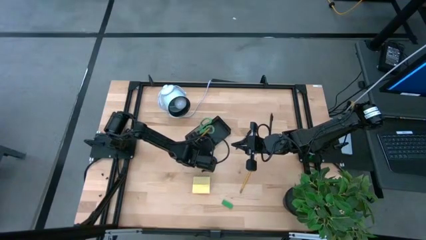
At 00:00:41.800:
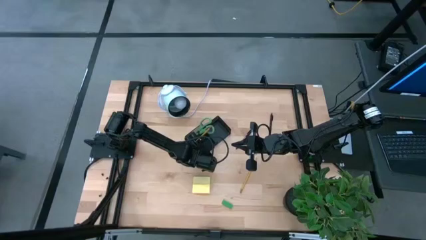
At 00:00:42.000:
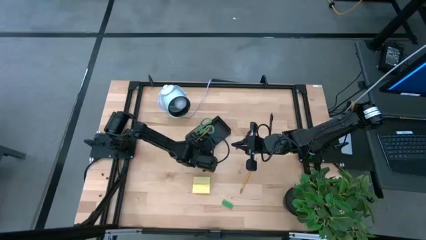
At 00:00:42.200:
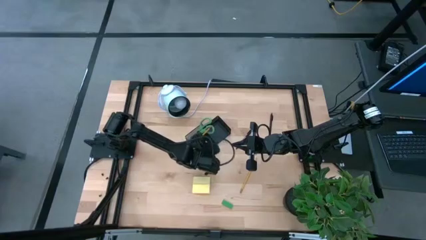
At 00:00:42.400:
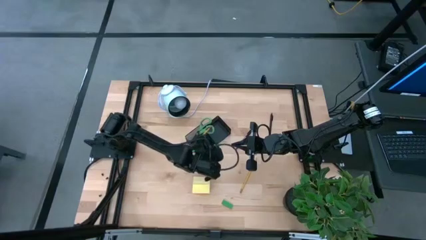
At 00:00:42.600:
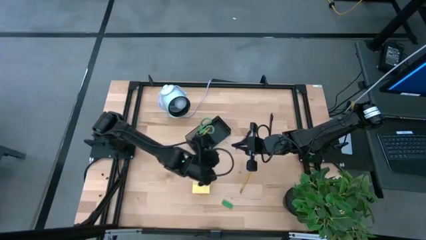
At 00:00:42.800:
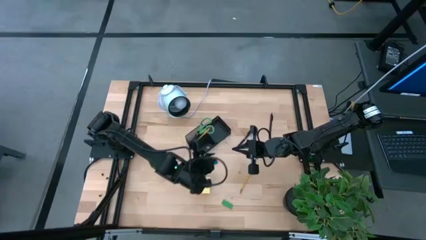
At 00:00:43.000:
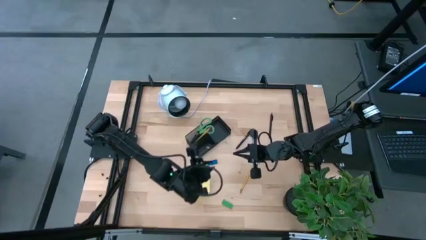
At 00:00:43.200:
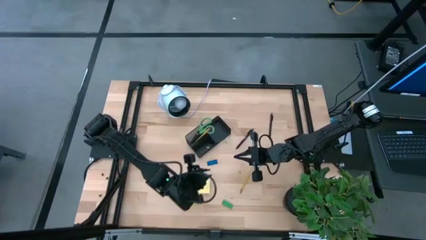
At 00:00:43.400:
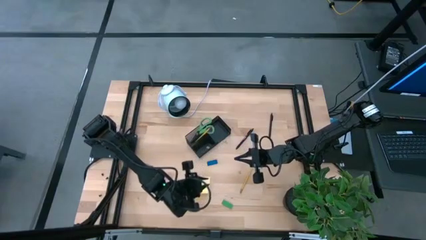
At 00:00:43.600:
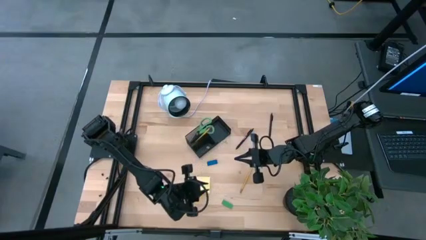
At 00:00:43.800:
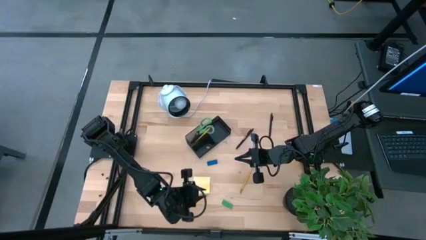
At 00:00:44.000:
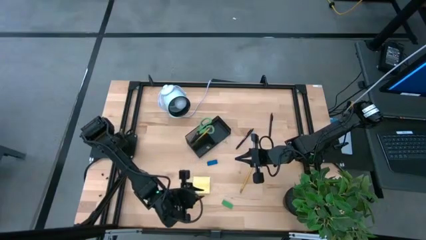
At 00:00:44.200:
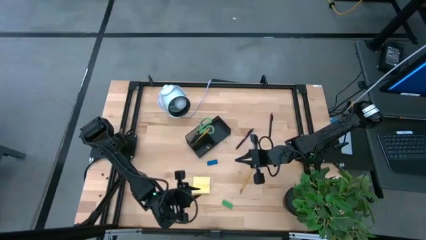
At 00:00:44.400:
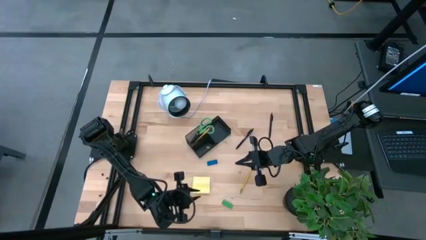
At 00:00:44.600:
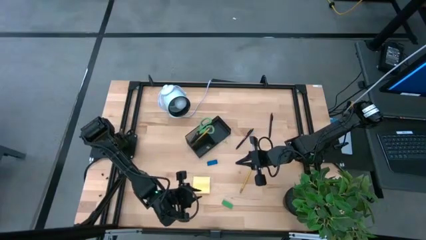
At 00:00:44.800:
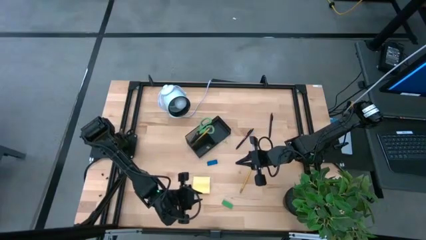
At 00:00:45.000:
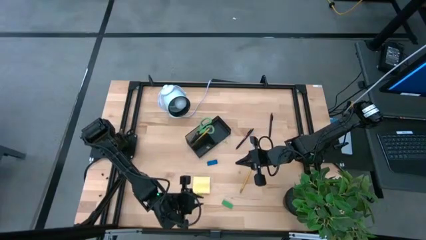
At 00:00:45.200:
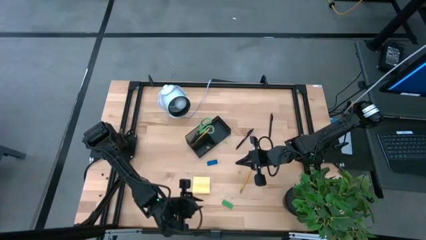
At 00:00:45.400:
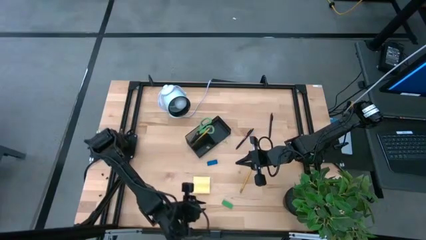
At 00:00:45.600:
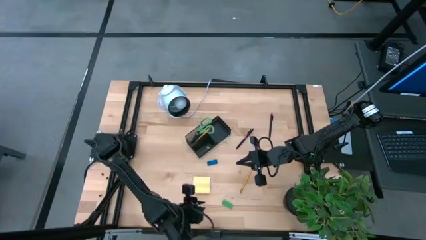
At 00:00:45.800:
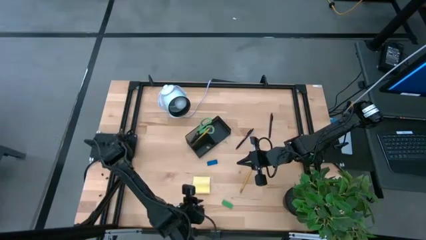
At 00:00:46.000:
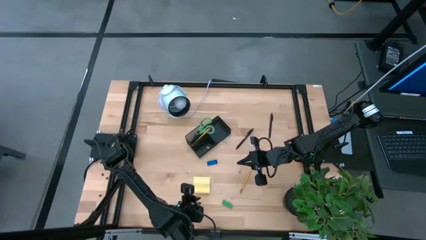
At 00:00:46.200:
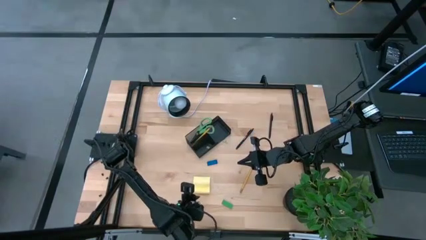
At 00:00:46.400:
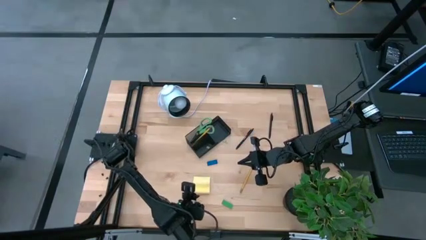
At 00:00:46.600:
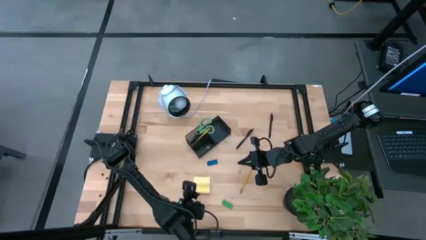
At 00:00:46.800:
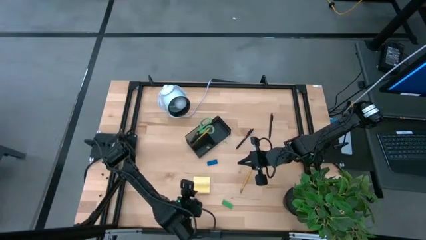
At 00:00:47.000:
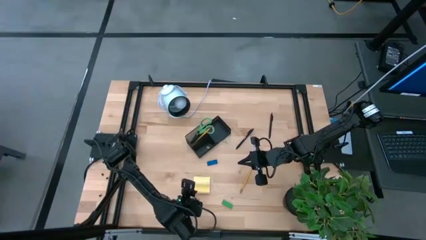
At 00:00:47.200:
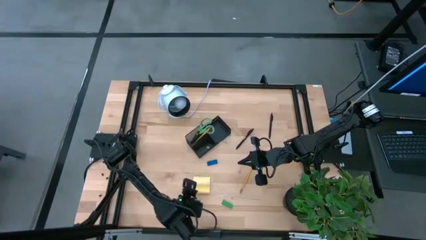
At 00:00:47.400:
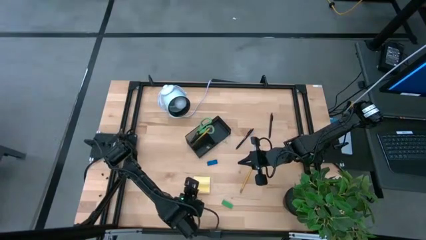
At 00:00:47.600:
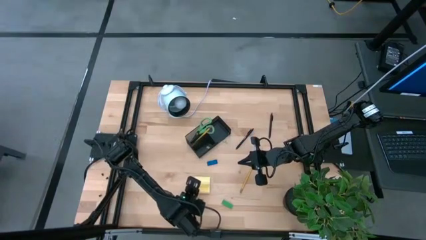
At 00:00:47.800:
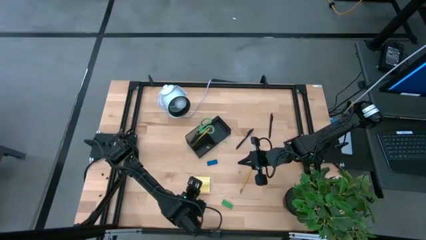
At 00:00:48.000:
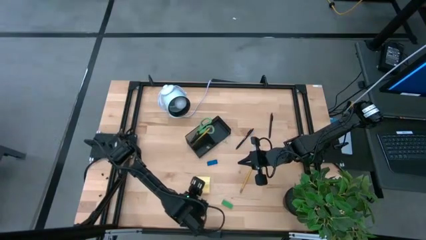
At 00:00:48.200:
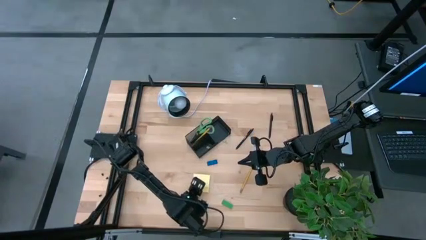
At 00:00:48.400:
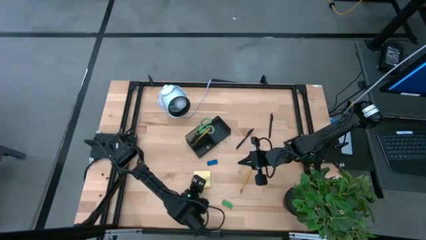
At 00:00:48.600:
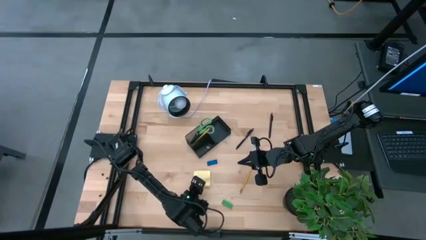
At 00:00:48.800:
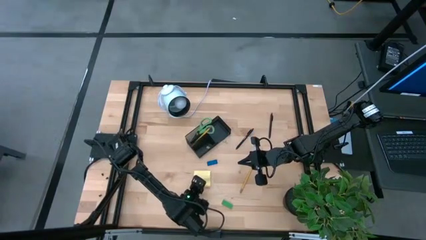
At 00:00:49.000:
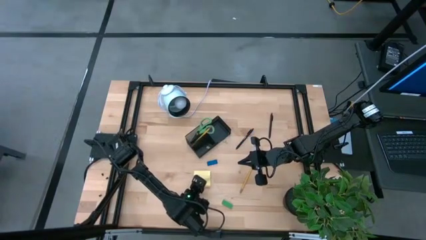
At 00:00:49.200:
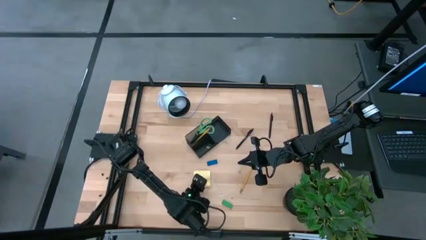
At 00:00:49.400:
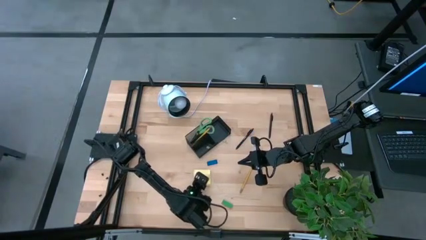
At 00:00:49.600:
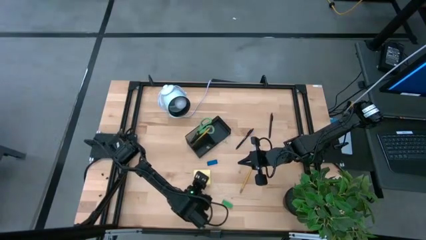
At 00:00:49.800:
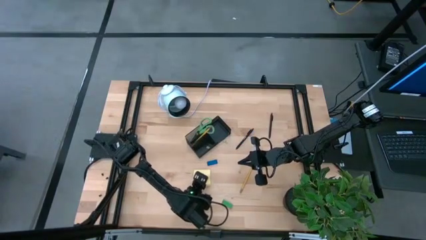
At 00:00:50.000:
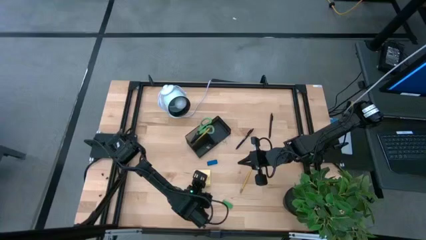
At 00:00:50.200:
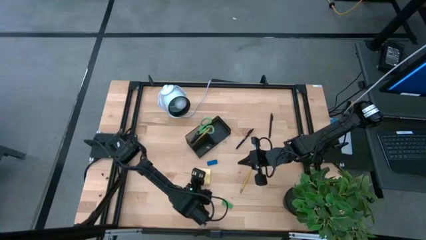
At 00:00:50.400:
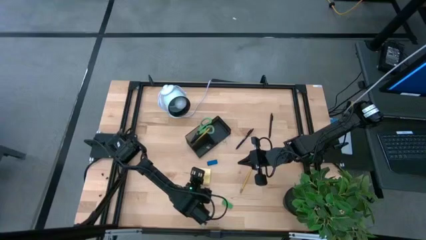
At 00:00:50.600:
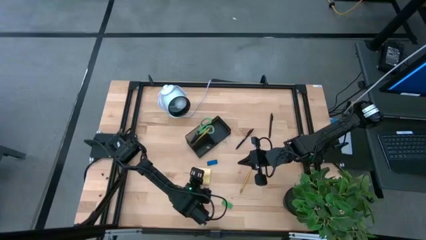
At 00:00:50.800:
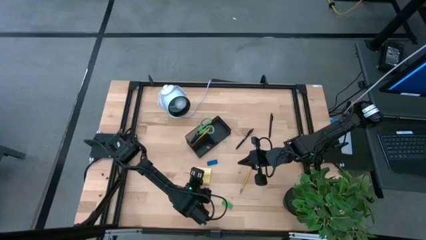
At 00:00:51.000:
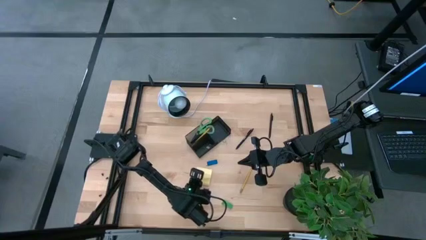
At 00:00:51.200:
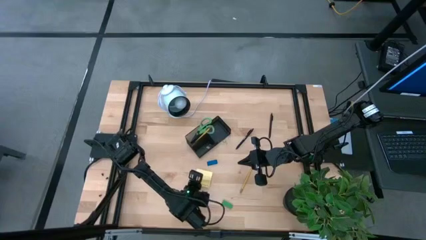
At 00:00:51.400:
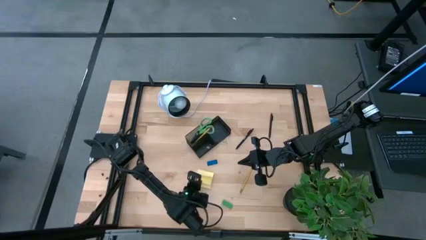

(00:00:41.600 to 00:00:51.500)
Task: Pick and place office supplies into organizer
Put the yellow sticky note pad into the black desk organizer
